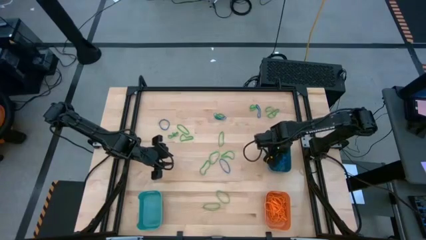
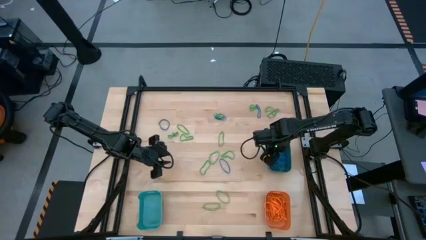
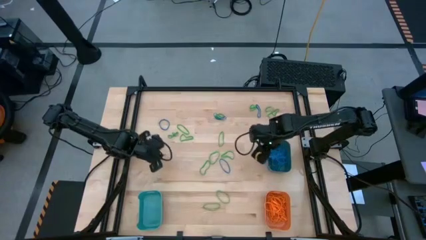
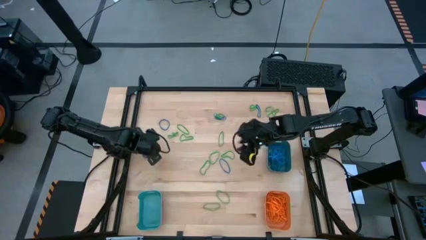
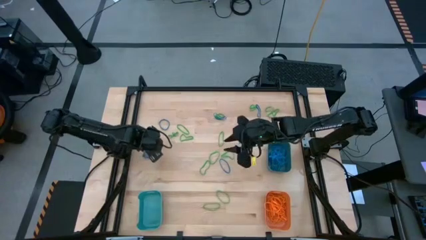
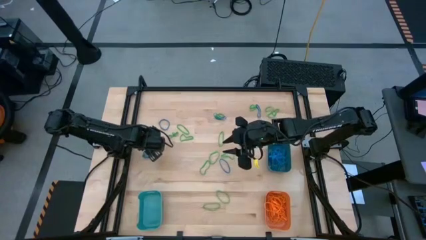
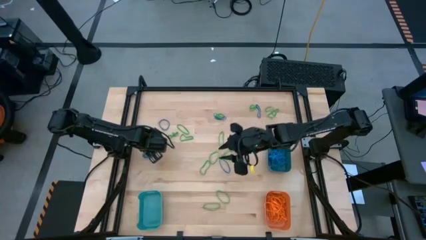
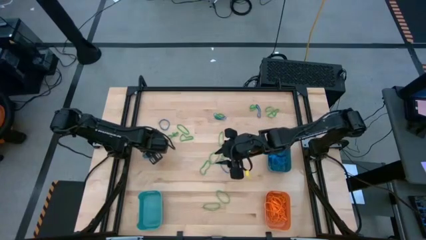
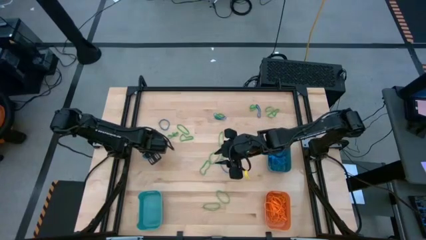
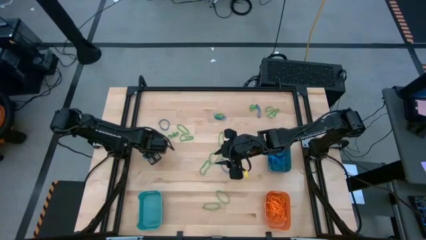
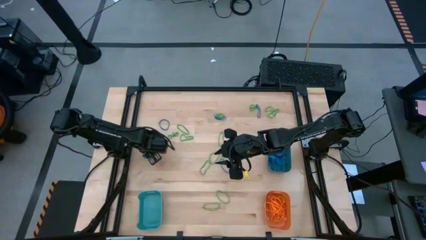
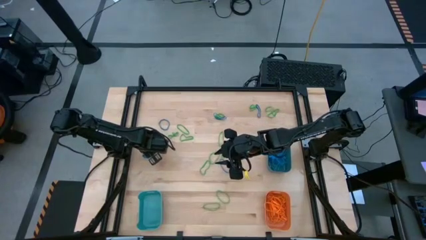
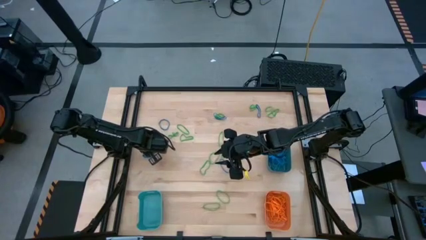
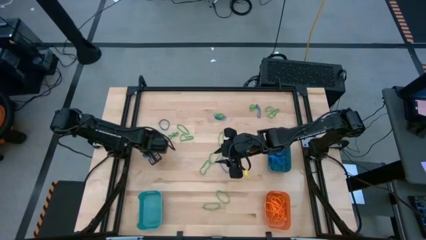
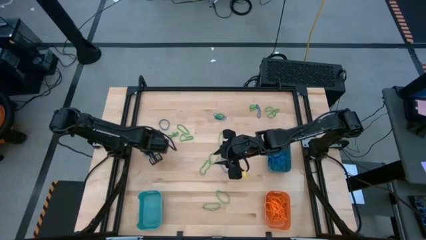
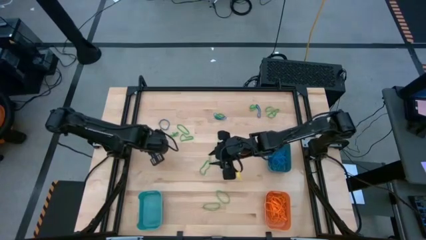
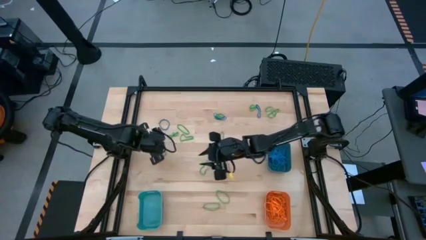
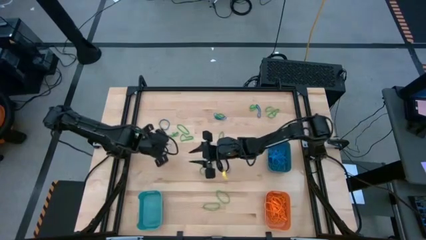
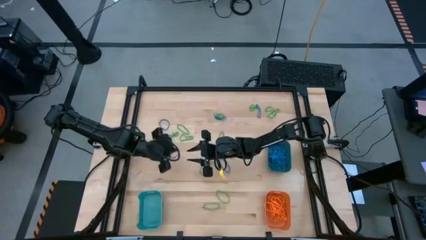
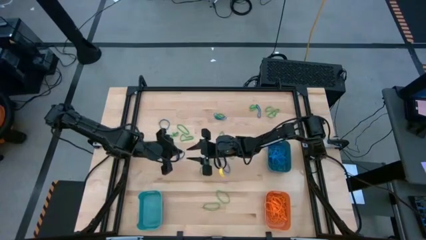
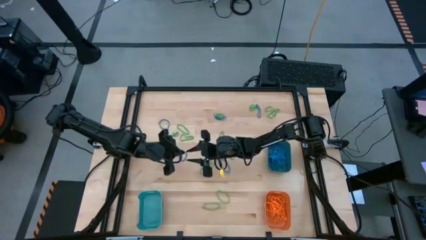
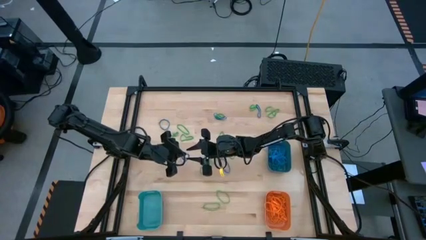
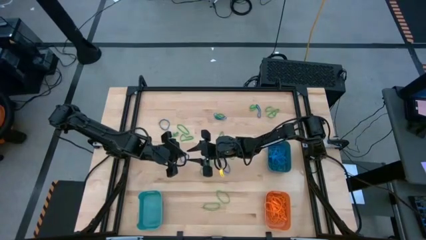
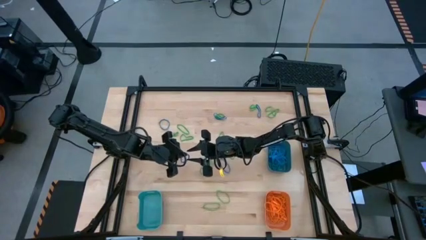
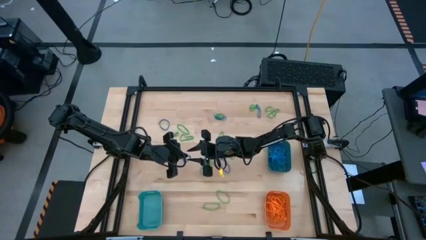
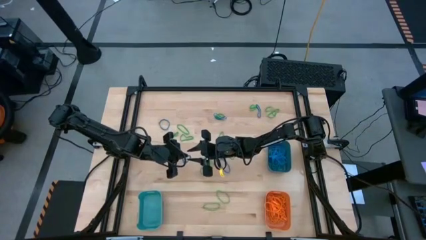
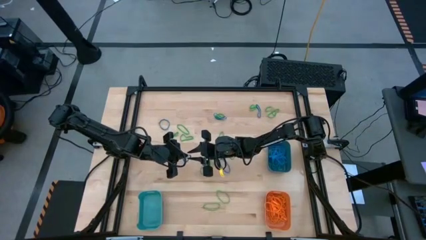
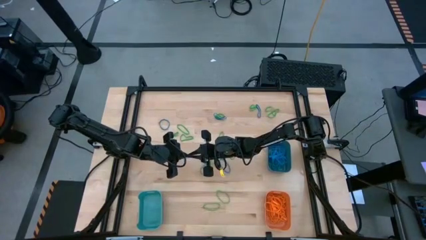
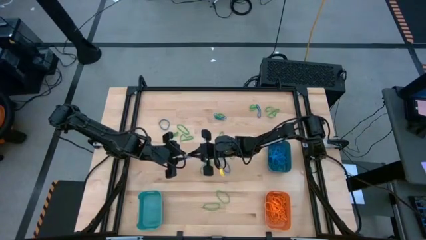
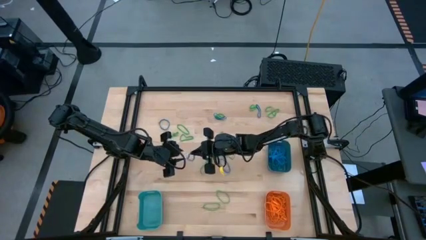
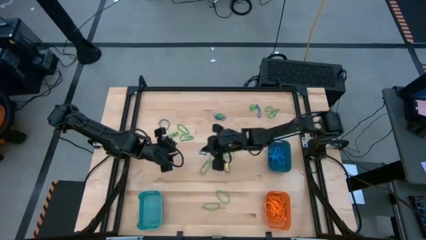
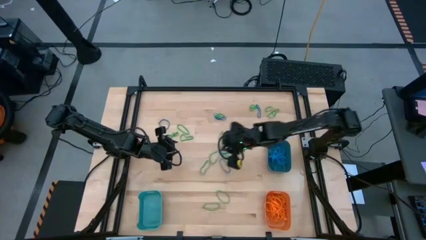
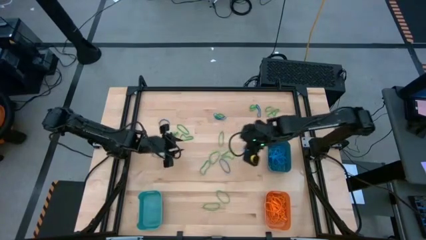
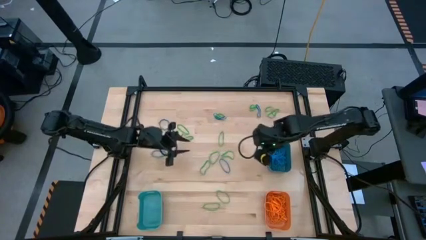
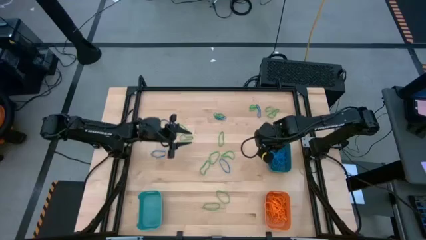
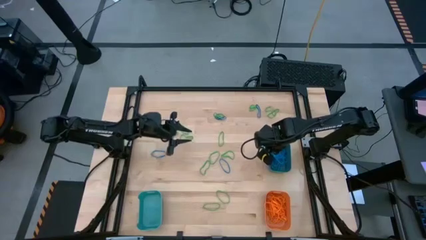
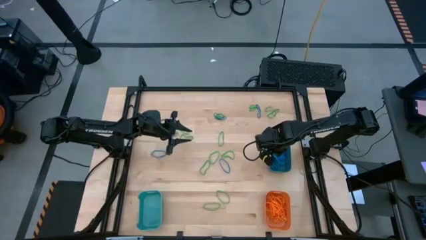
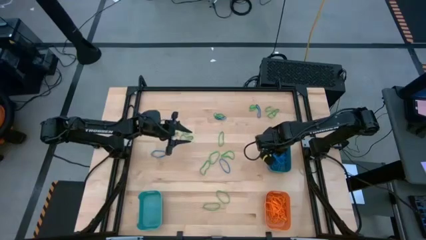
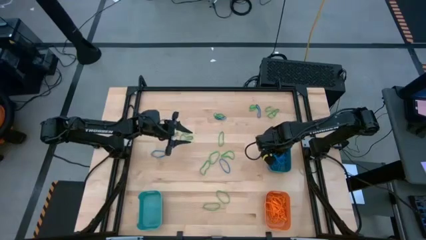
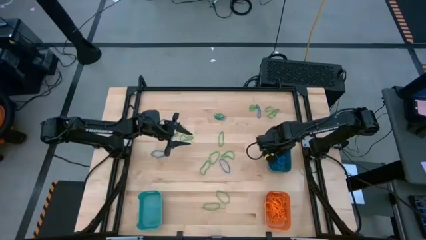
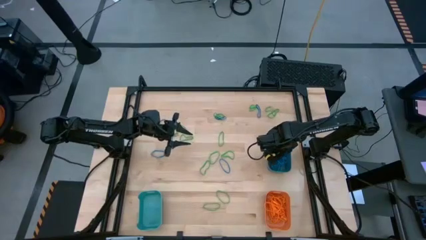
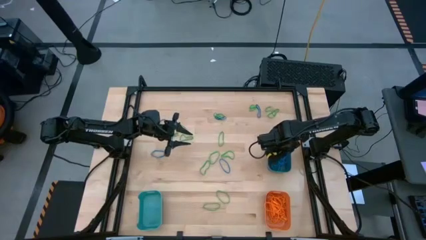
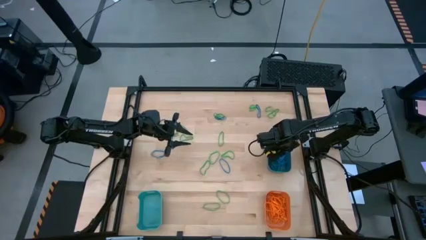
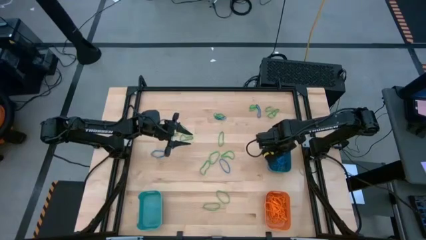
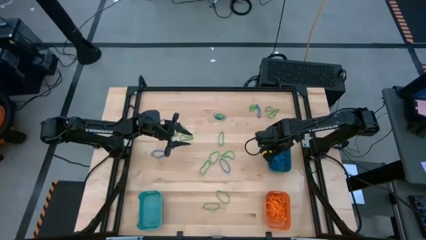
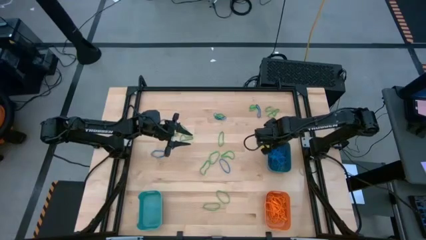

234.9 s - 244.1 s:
Task: Sort rubber bands into baskets
Put the blue rubber band into the dark blue bin

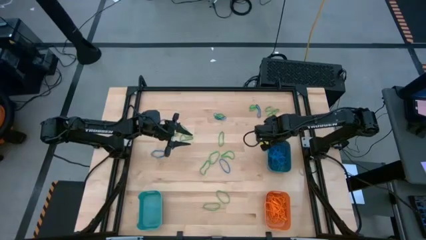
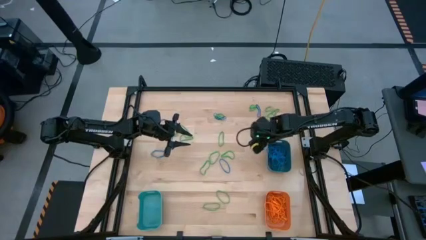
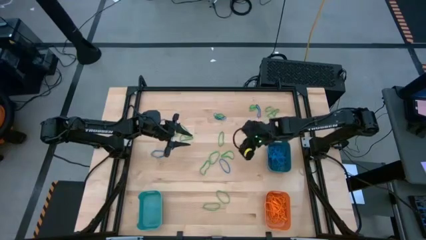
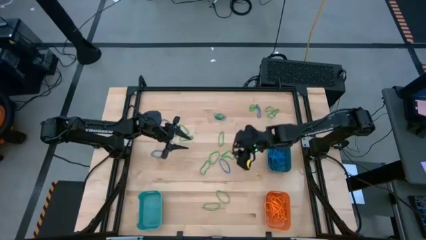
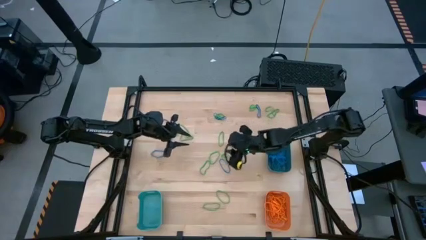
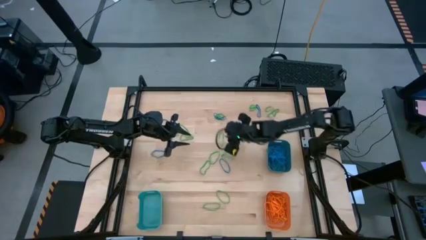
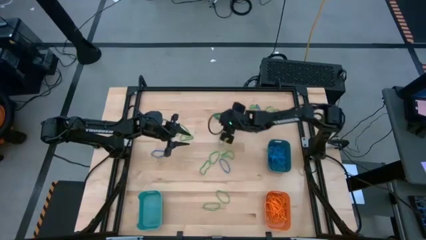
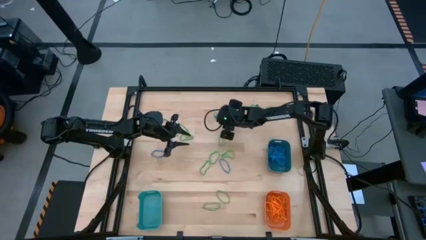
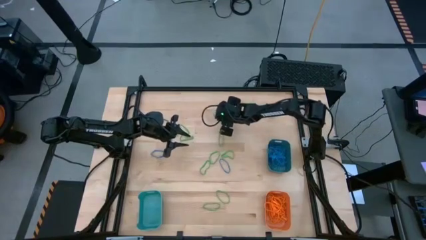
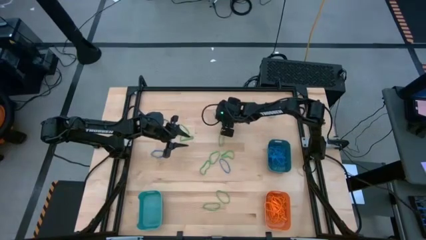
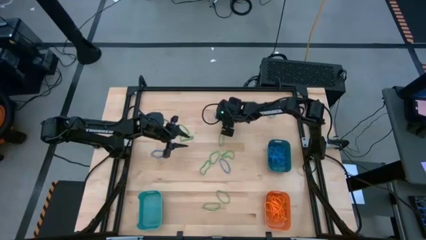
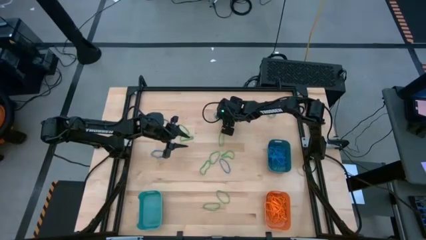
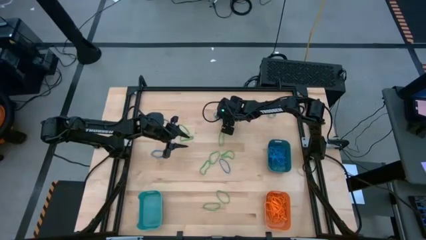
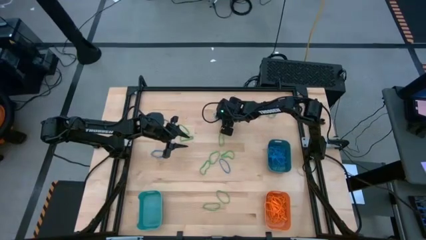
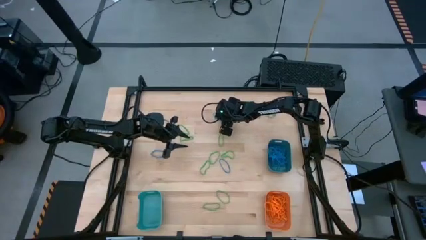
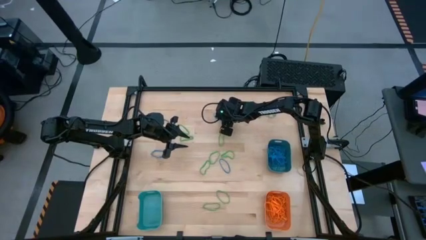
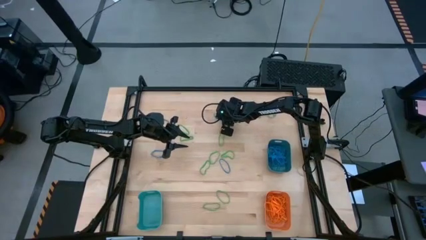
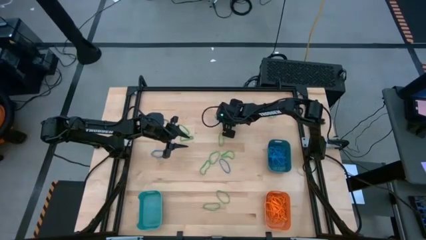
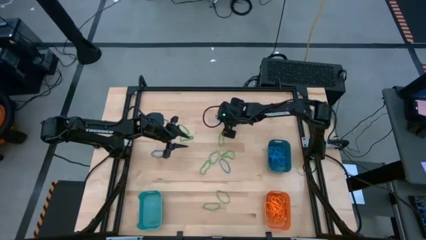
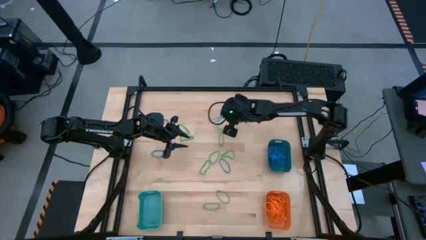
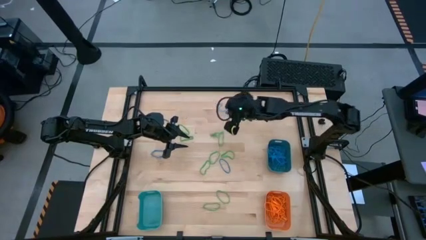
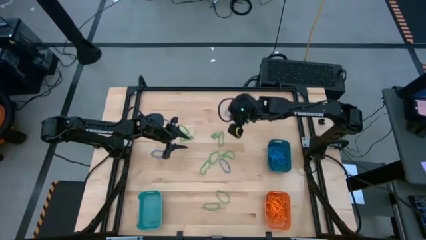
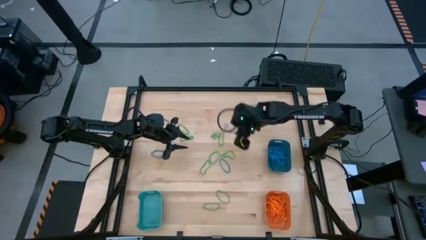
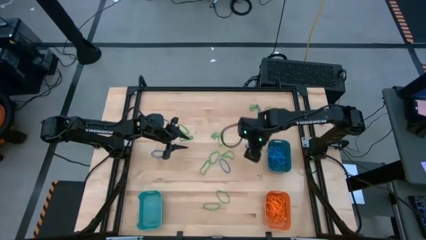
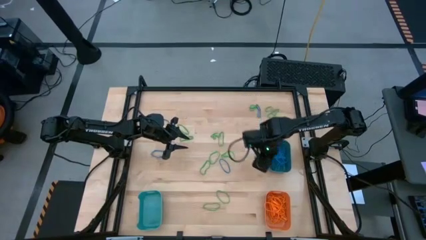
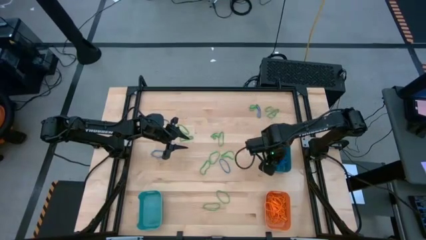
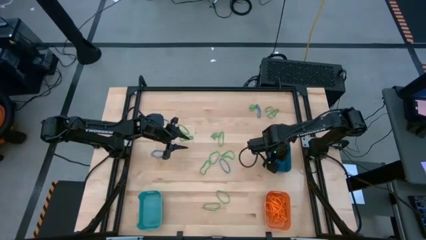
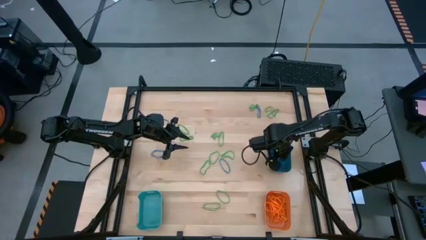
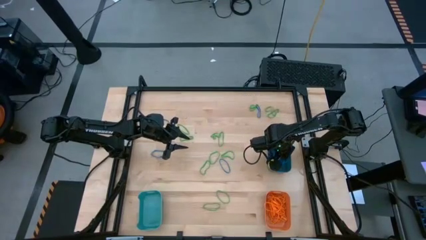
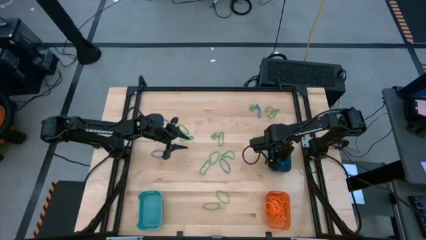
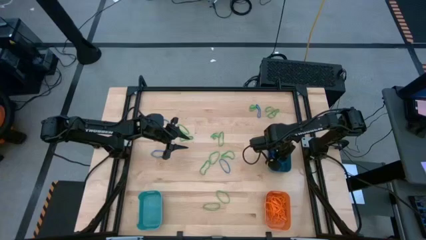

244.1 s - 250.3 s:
Put the blue rubber band into the dark blue bin

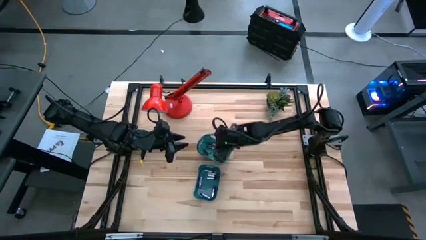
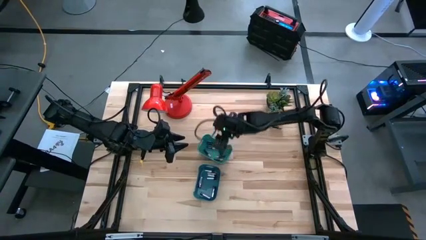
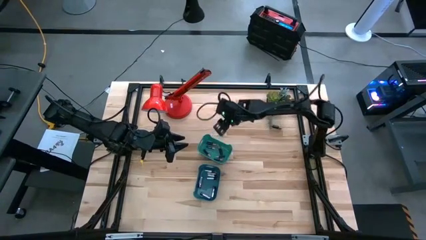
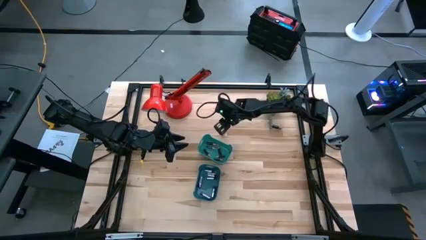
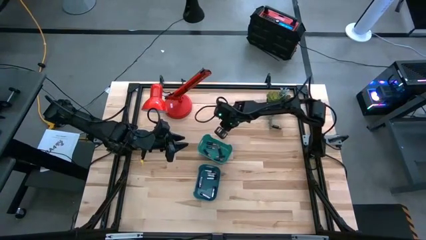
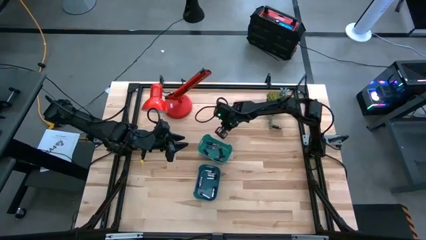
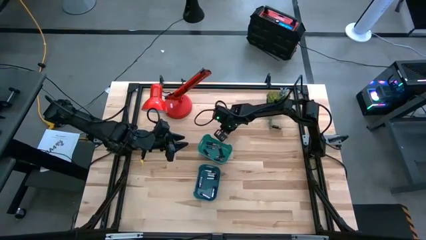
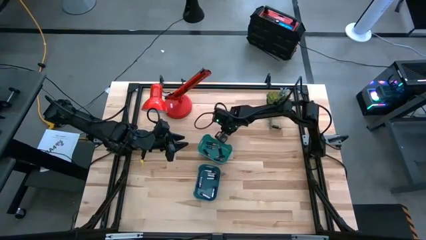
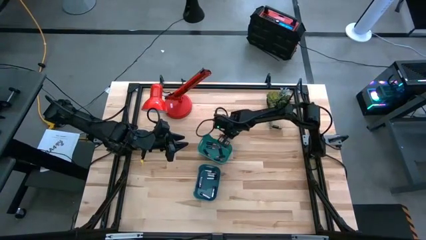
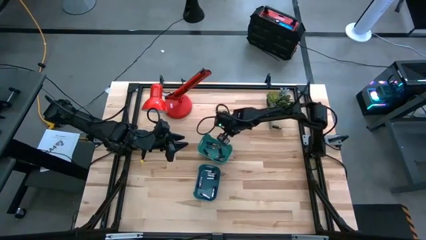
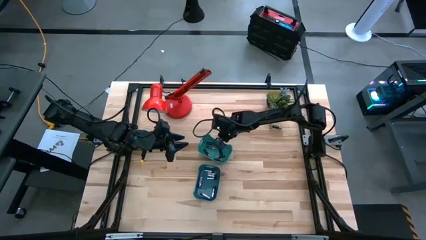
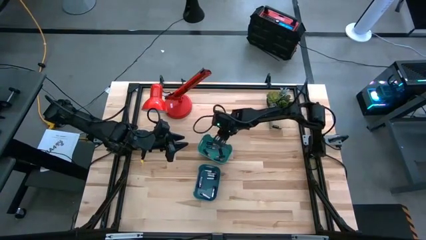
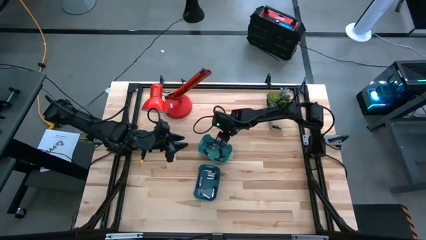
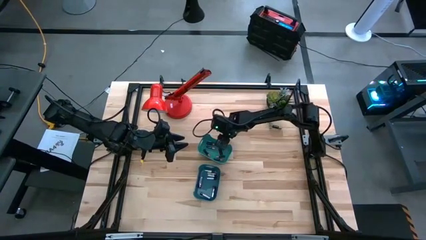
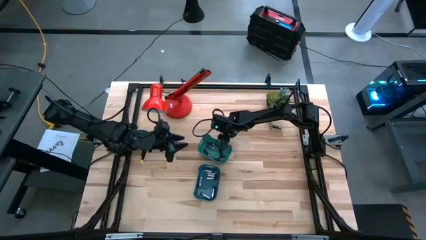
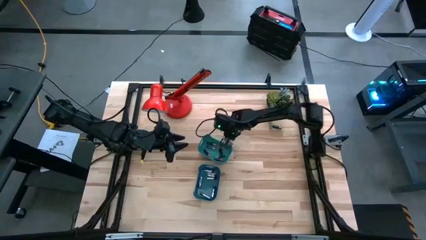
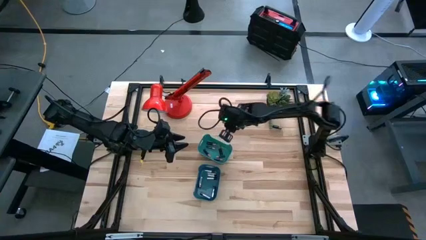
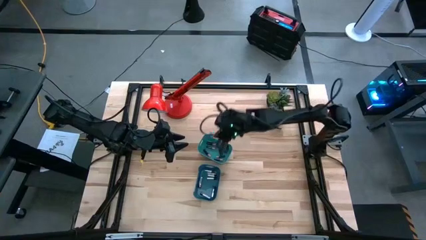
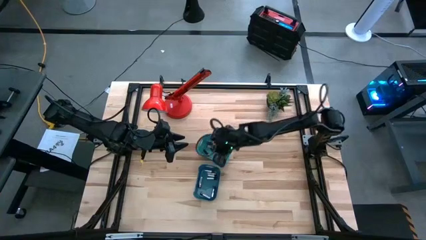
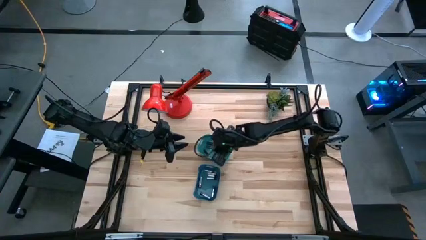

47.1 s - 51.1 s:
Task: Sort batteries
Put the black battery into the light blue bin
